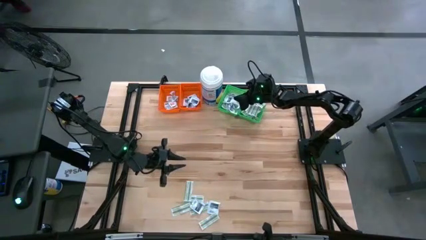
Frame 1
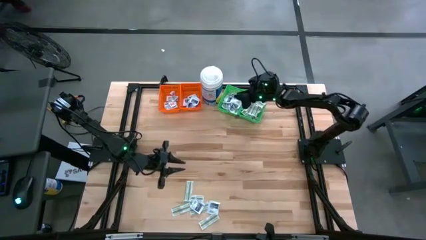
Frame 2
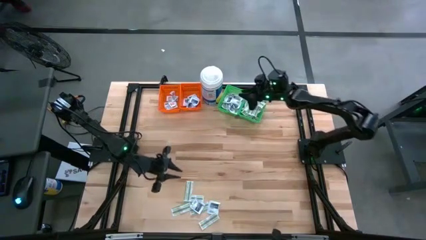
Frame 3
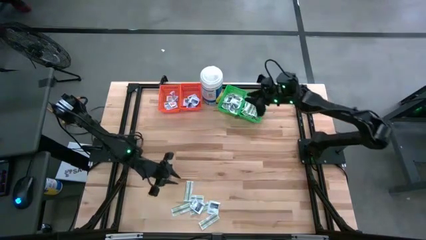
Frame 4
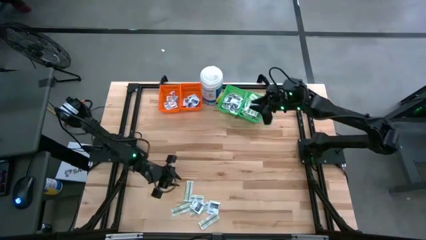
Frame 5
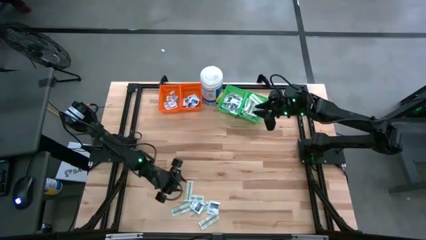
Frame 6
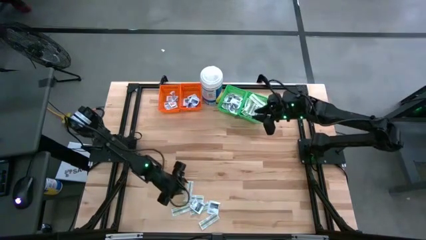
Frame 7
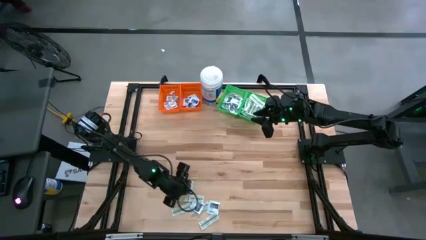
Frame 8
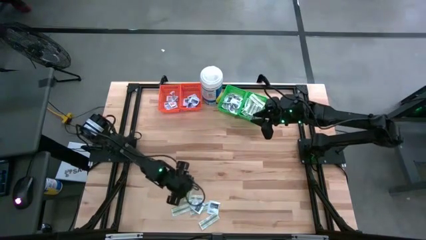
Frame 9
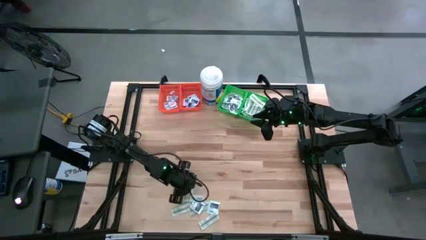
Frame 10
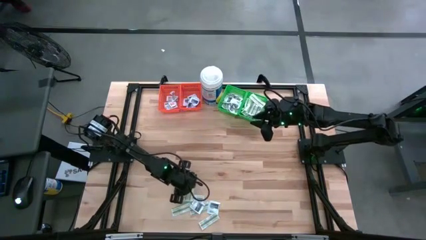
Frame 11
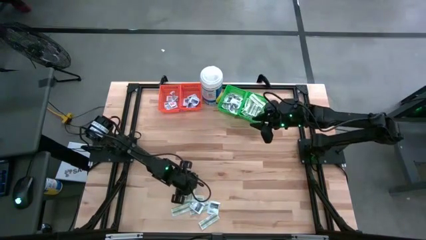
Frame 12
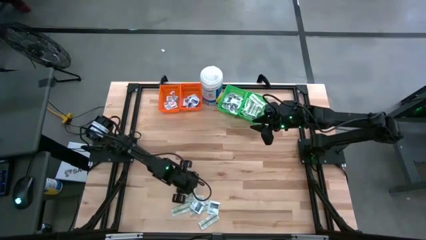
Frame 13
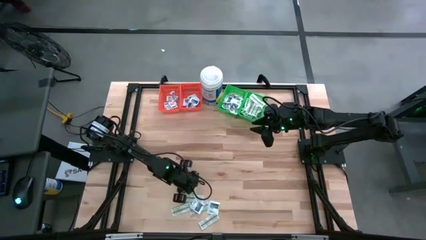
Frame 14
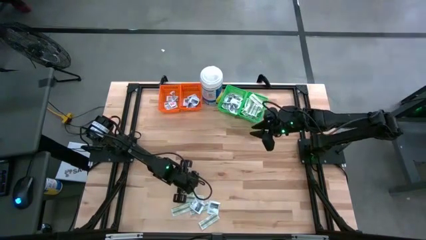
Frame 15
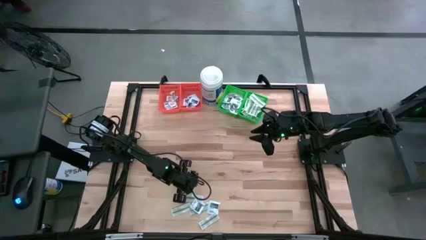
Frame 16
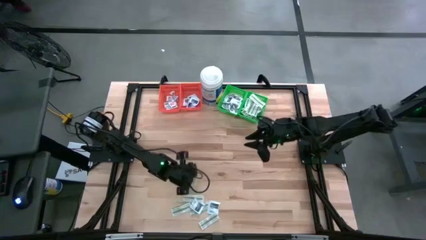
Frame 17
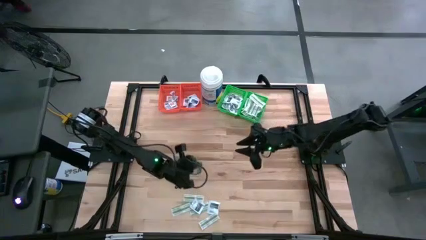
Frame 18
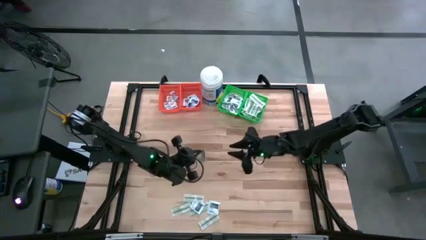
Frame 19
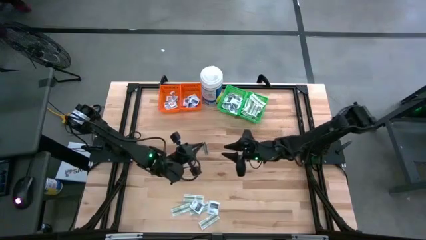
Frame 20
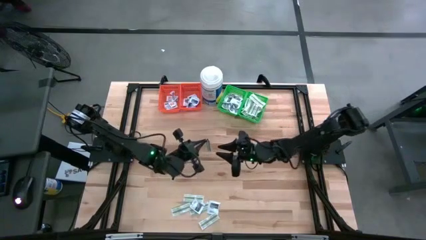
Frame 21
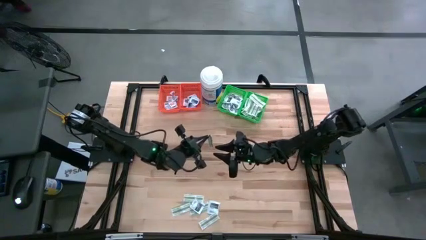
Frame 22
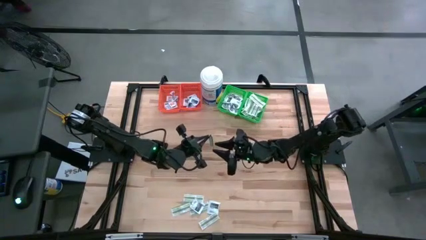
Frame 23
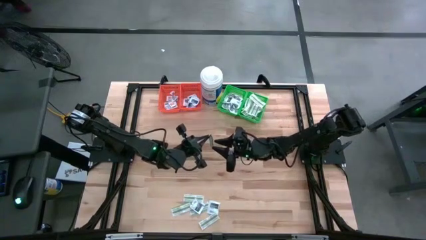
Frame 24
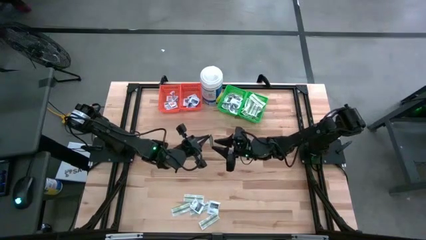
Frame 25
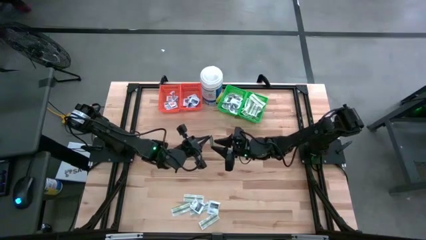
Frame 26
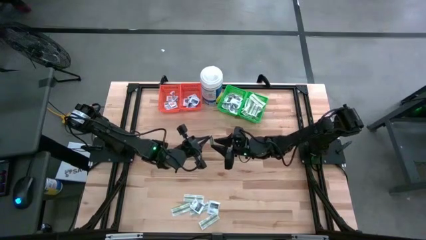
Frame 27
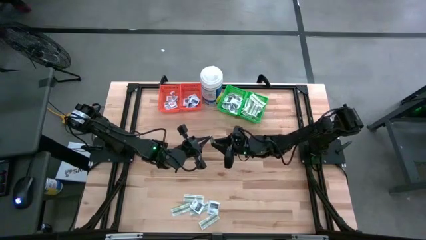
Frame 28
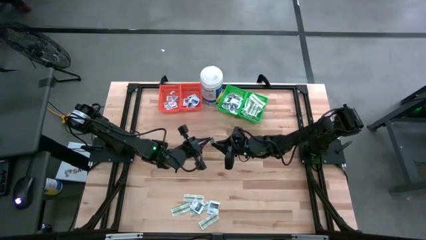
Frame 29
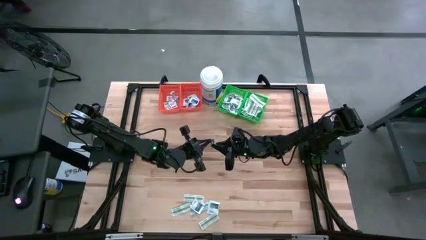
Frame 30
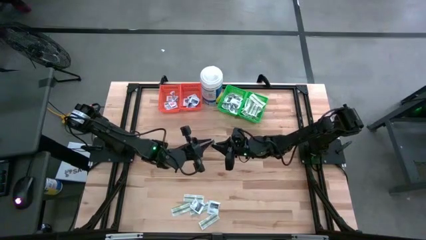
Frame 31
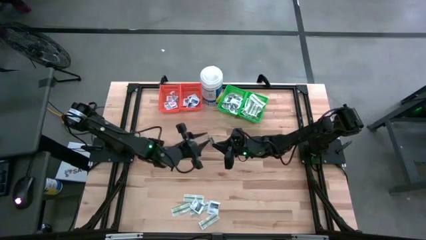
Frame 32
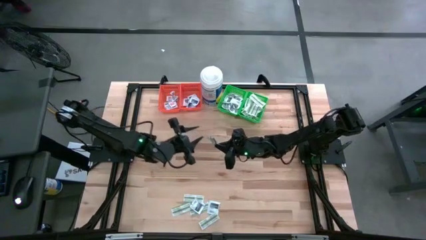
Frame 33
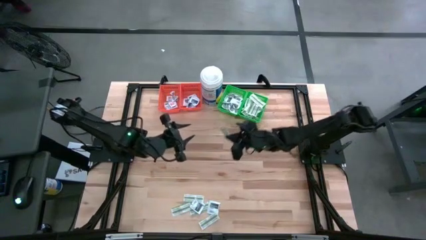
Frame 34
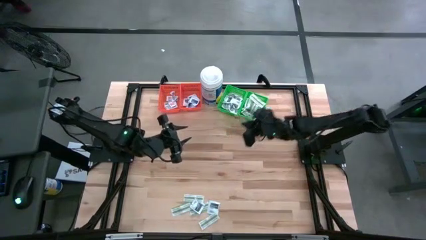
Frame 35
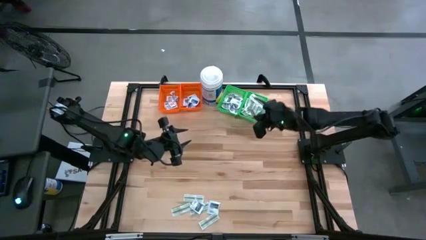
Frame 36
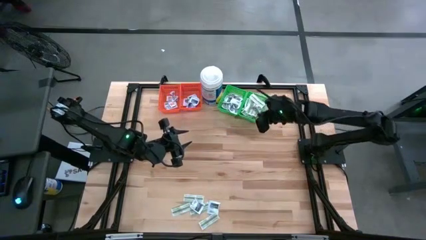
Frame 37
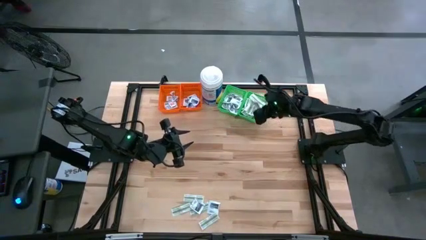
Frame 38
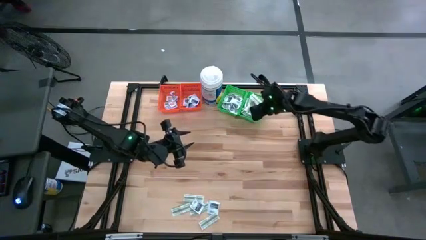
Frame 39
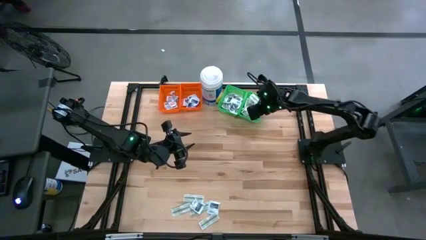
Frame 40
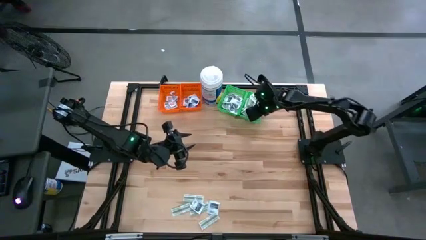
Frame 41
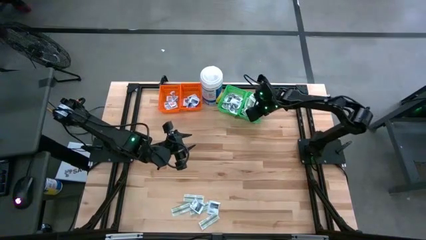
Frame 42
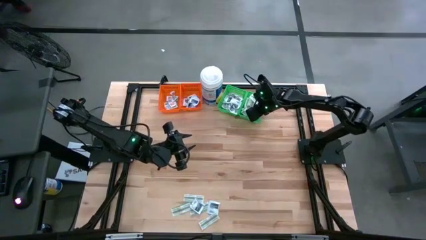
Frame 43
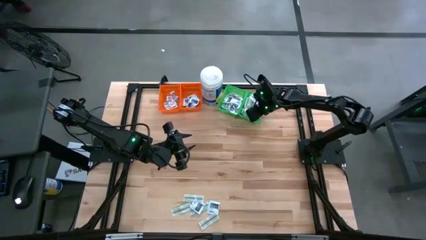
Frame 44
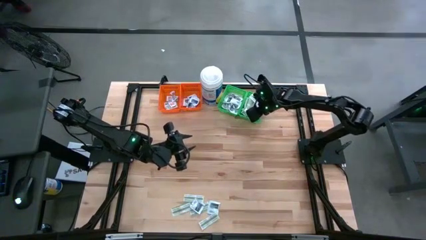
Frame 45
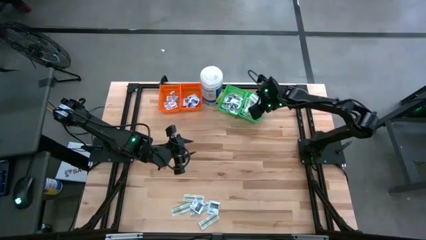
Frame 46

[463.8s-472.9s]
Task: Pick & Place First Aid Supplies
Put the green bandage pack into the right green bin

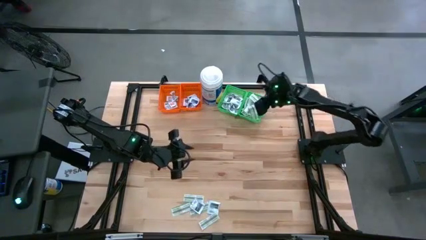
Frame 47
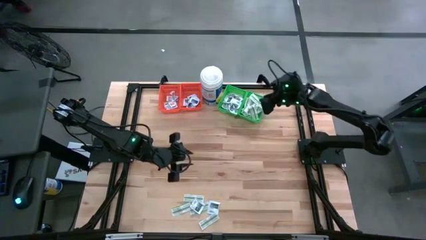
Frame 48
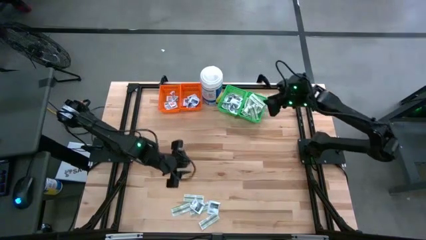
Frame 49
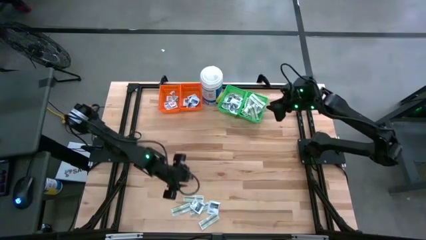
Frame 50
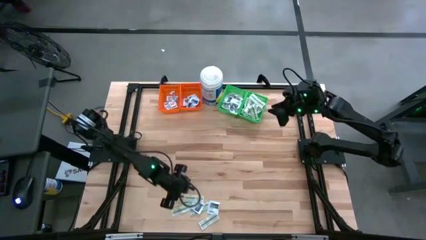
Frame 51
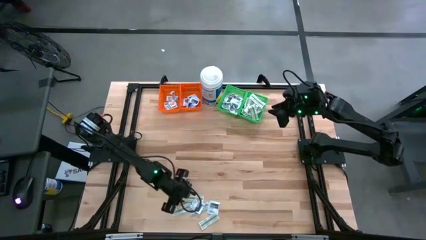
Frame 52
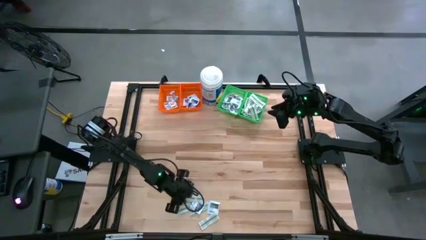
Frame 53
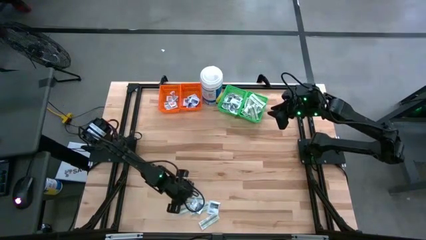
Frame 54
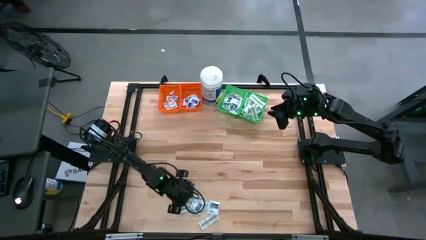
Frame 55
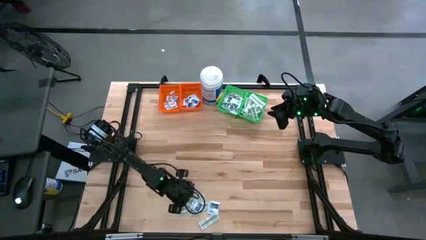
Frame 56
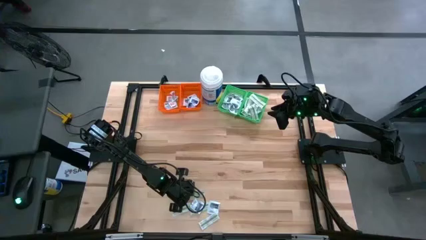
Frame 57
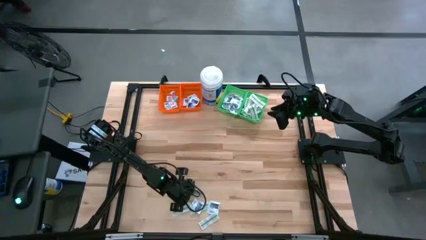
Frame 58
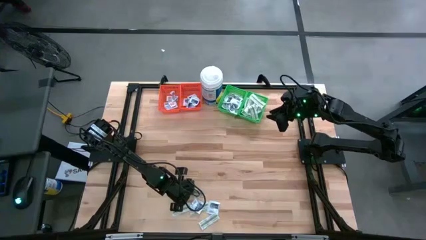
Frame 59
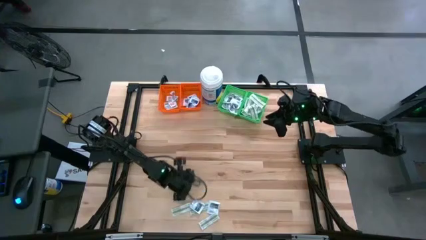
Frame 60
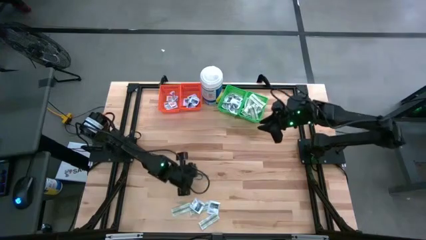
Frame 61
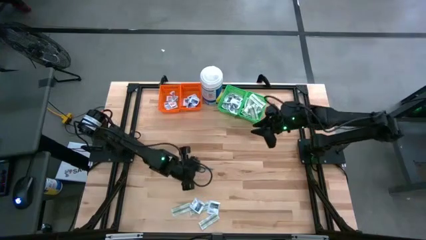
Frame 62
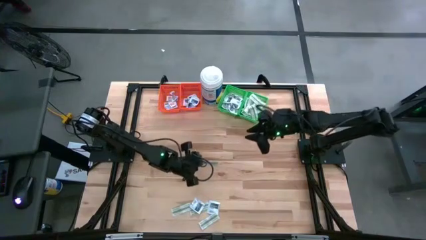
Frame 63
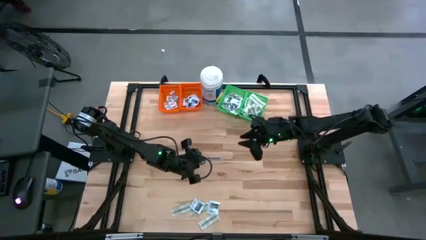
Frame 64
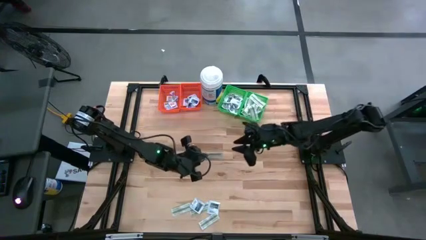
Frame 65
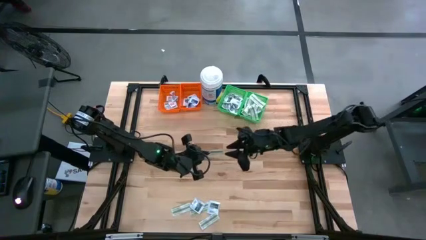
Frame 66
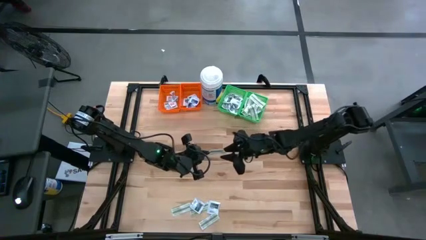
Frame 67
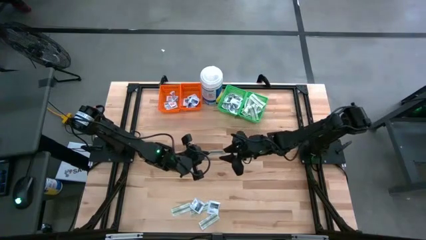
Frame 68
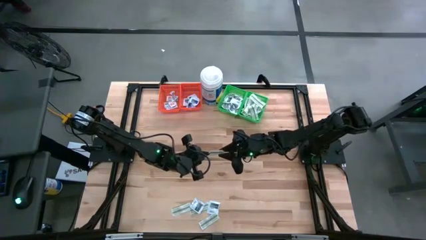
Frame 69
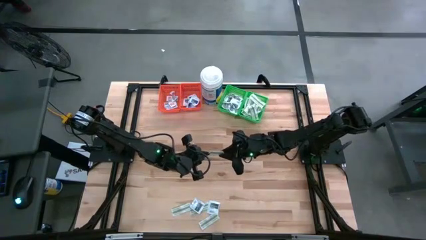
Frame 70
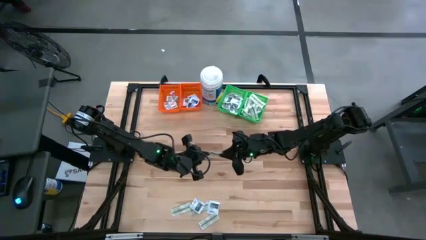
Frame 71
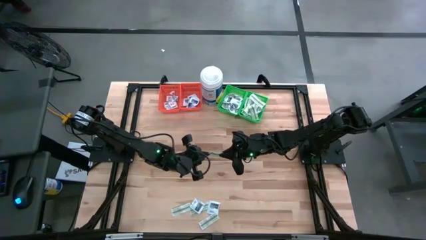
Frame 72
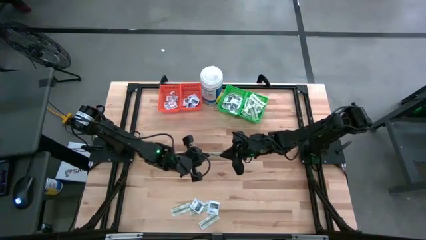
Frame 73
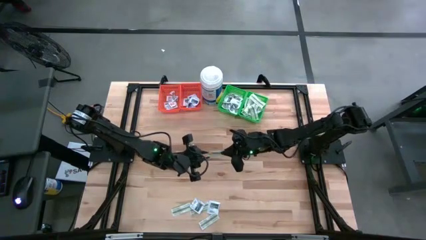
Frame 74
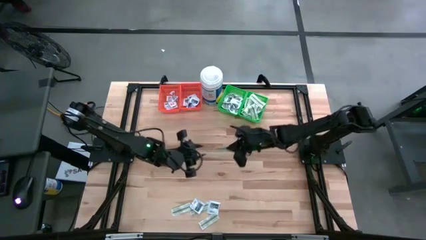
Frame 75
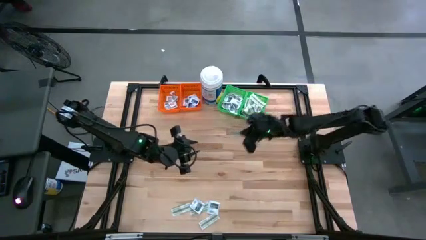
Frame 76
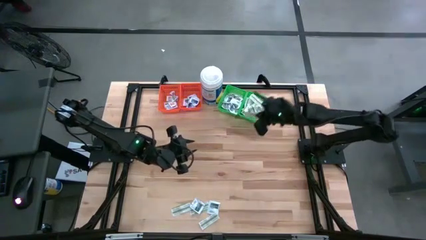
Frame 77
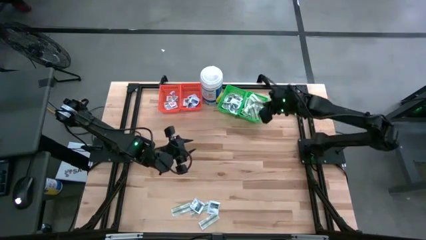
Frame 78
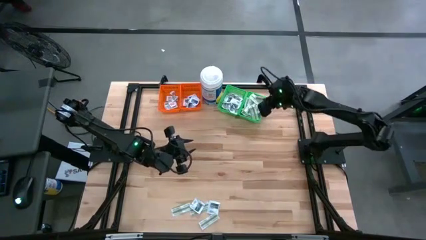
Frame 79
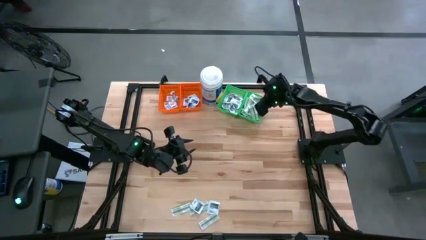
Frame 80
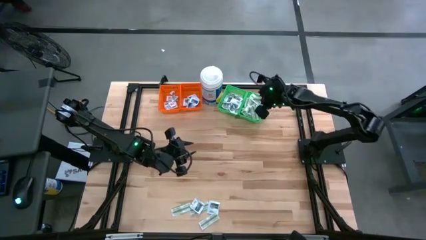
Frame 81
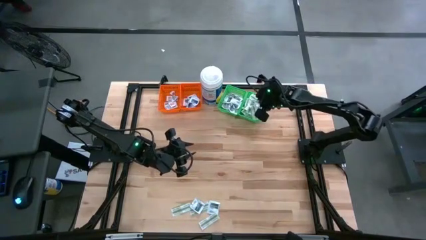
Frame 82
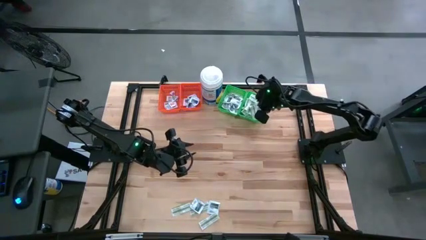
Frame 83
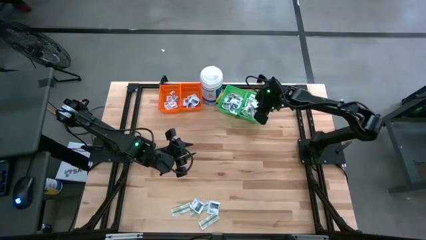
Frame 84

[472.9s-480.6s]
Put the green bandage pack into the right green bin
